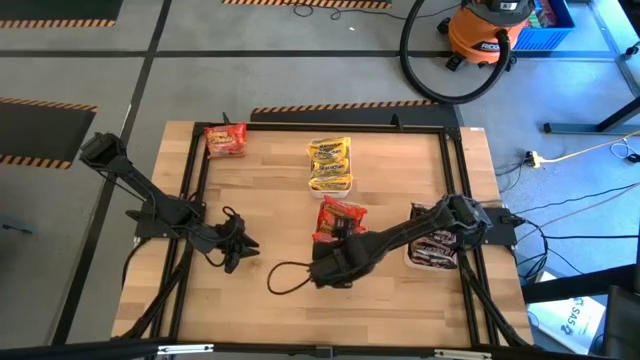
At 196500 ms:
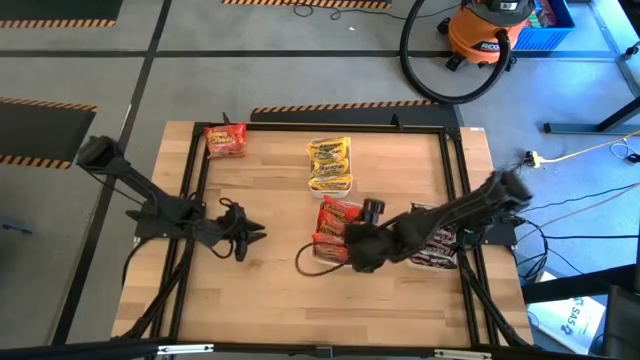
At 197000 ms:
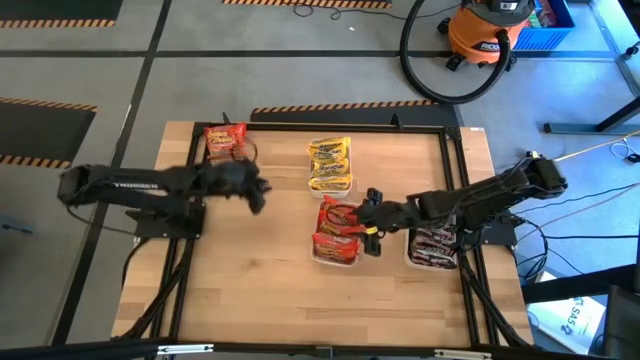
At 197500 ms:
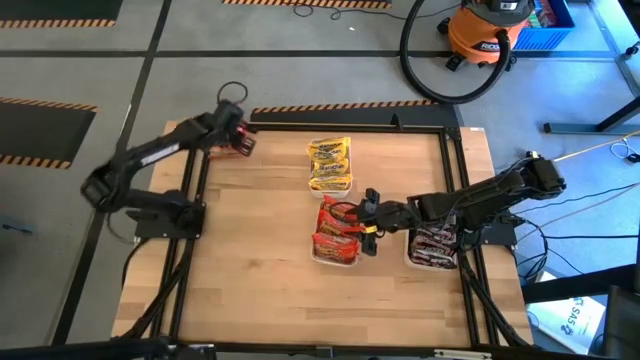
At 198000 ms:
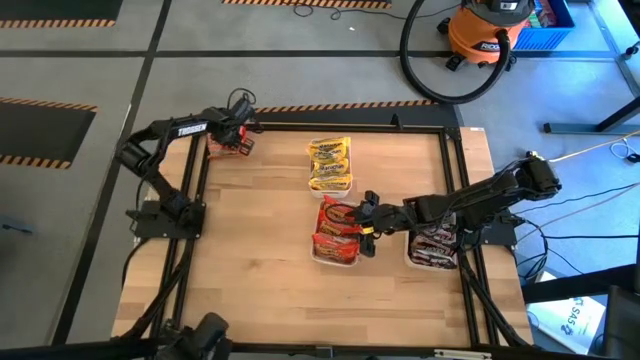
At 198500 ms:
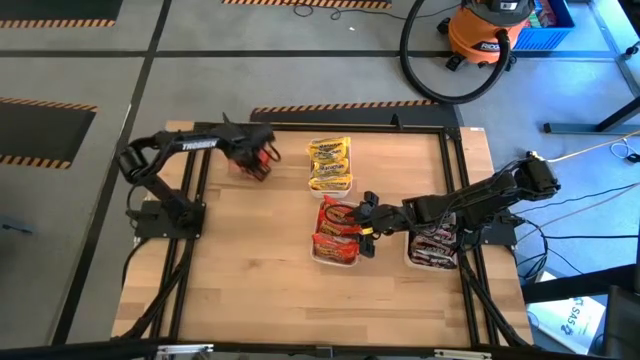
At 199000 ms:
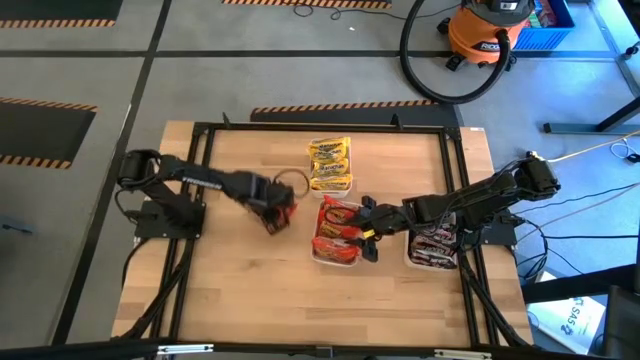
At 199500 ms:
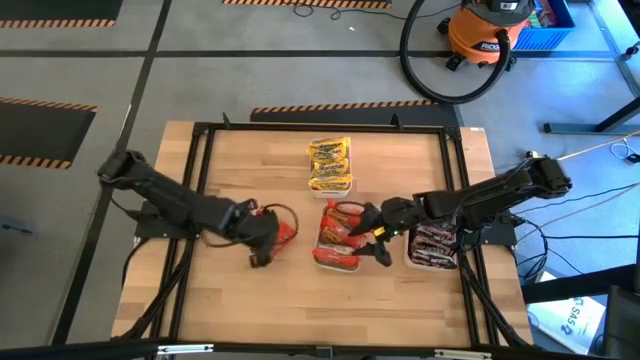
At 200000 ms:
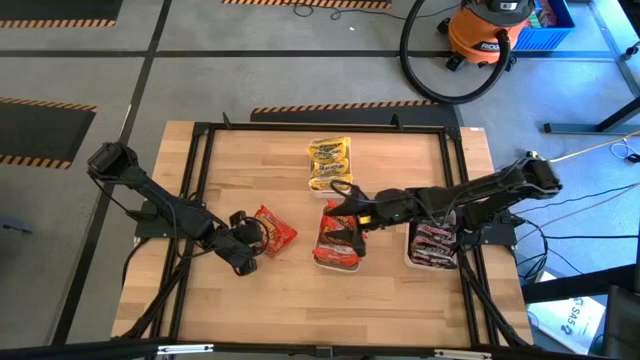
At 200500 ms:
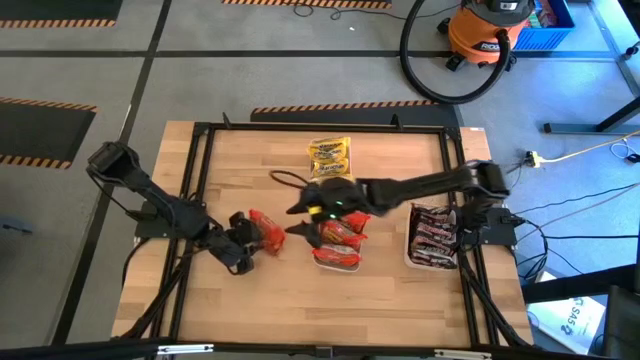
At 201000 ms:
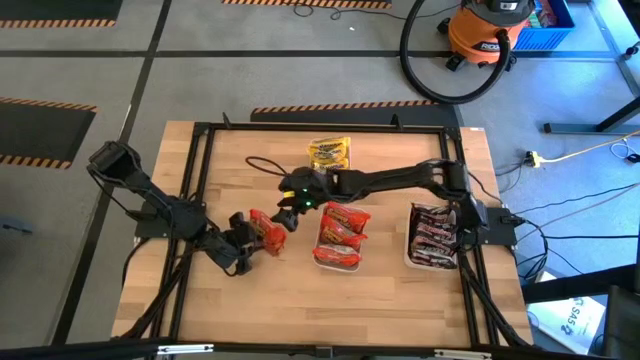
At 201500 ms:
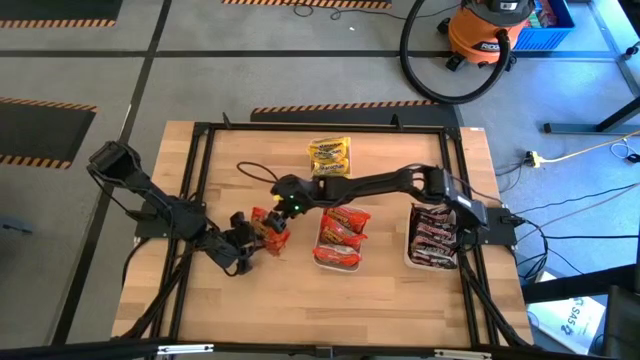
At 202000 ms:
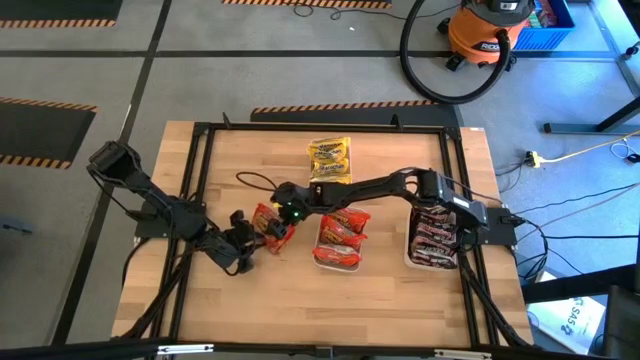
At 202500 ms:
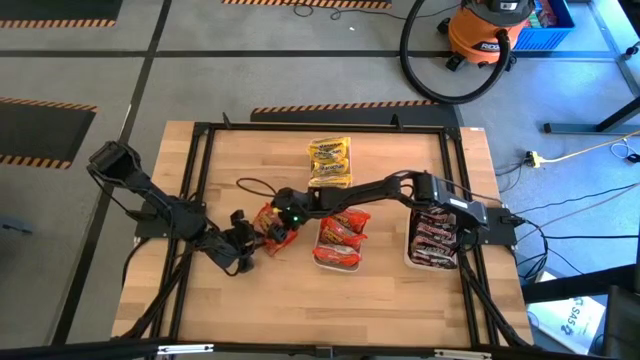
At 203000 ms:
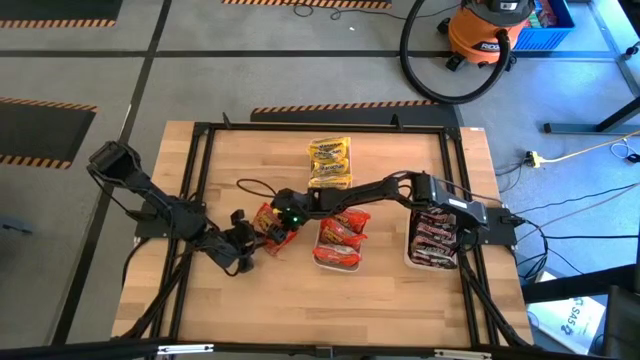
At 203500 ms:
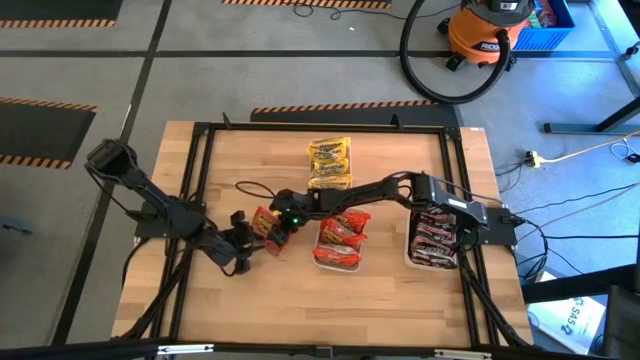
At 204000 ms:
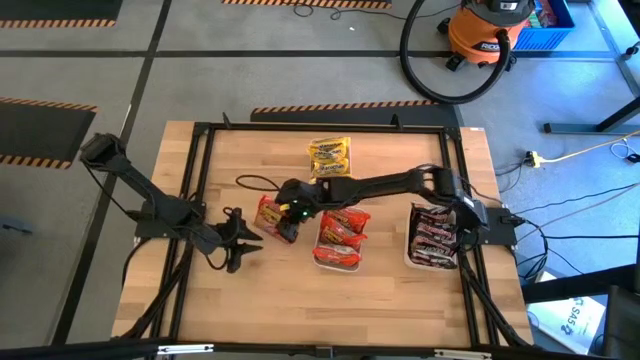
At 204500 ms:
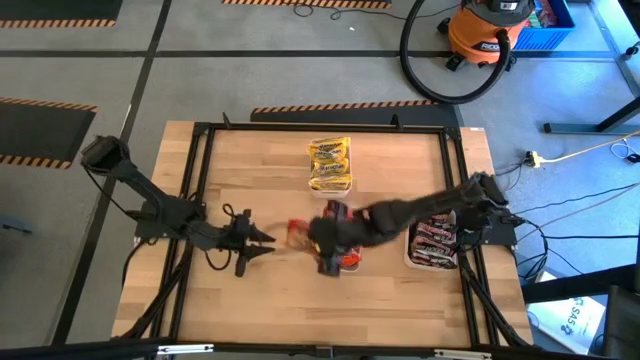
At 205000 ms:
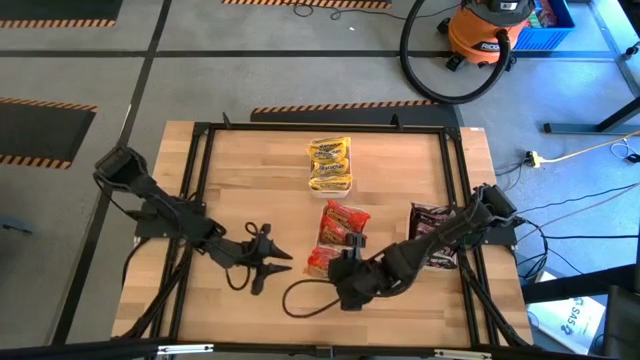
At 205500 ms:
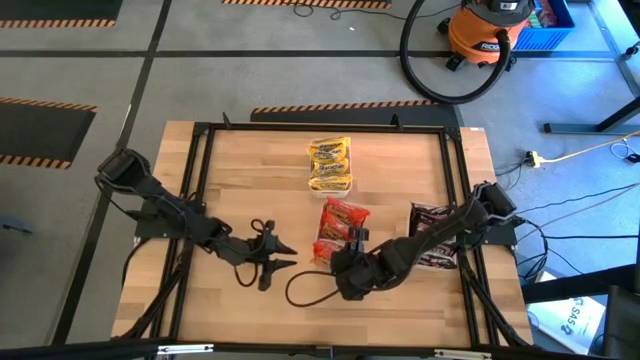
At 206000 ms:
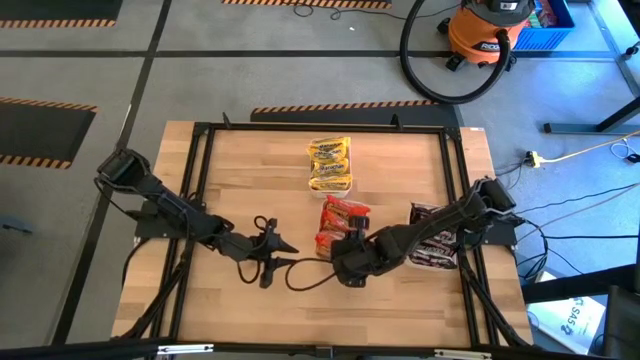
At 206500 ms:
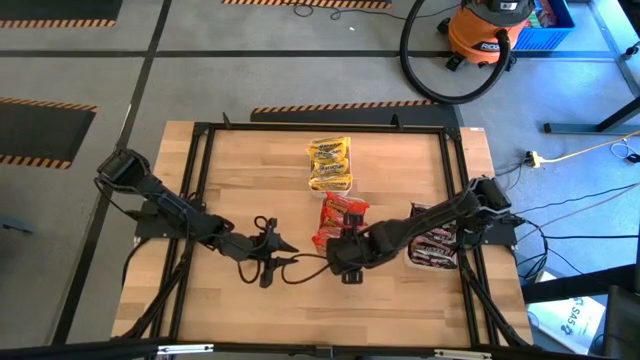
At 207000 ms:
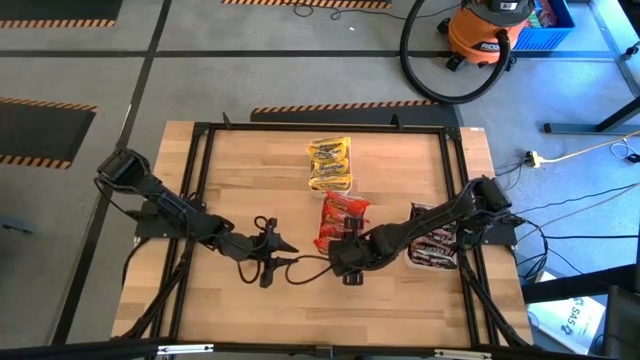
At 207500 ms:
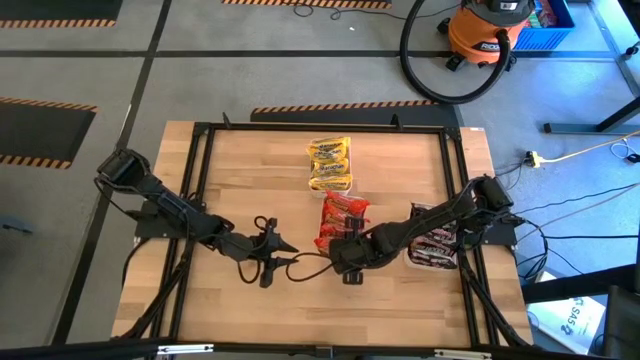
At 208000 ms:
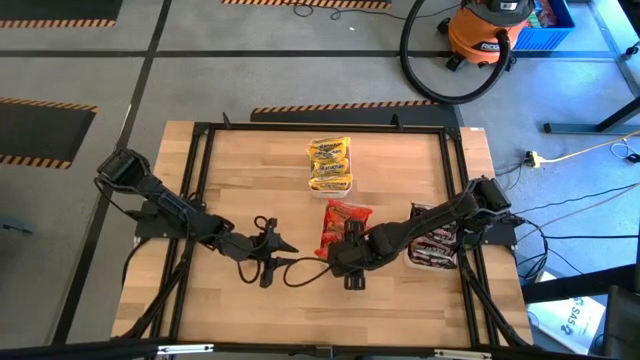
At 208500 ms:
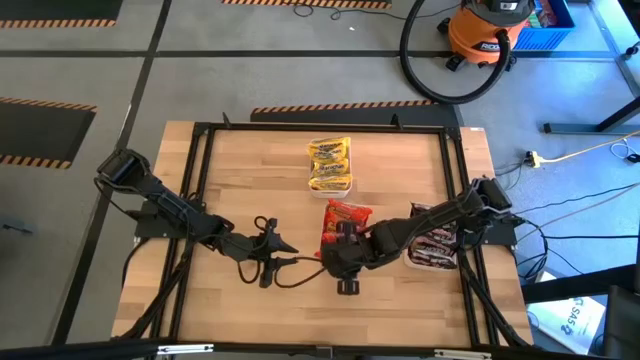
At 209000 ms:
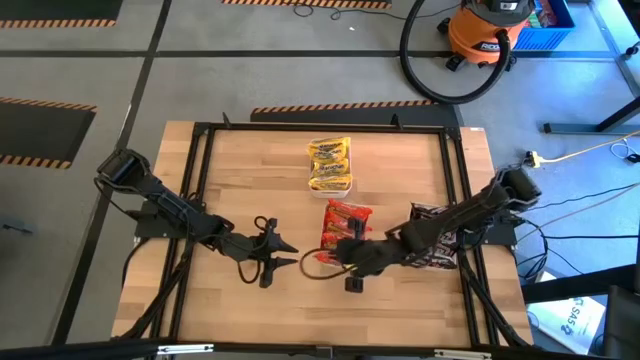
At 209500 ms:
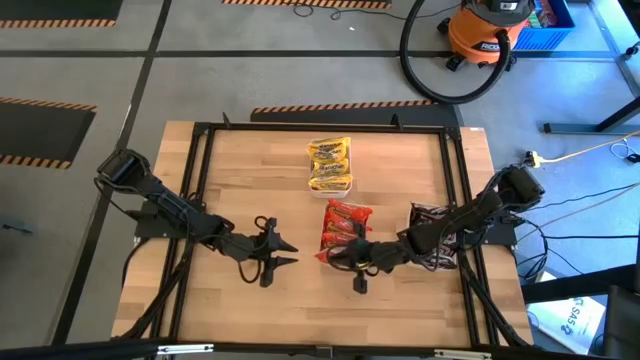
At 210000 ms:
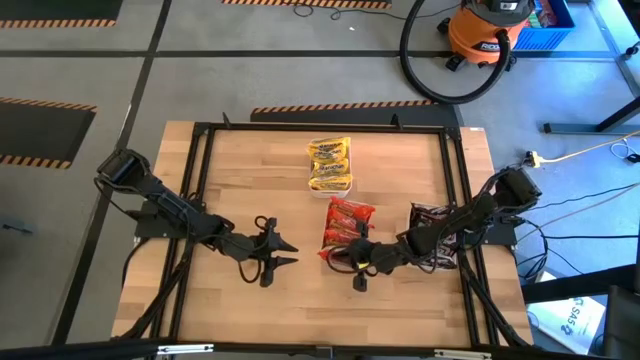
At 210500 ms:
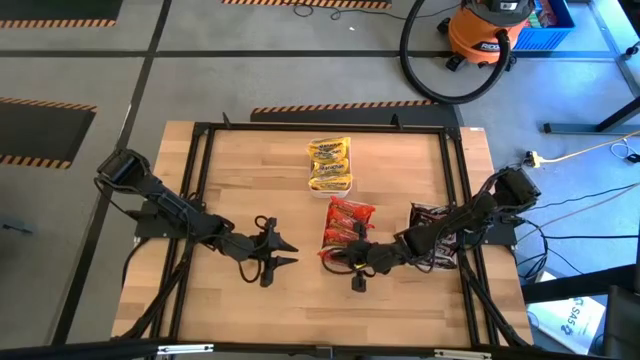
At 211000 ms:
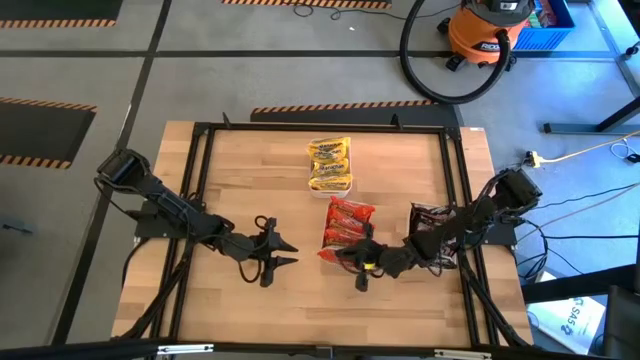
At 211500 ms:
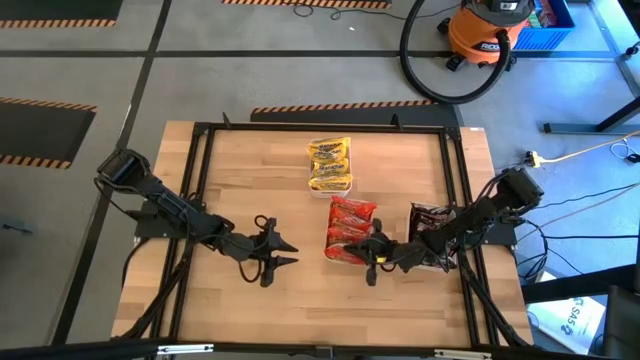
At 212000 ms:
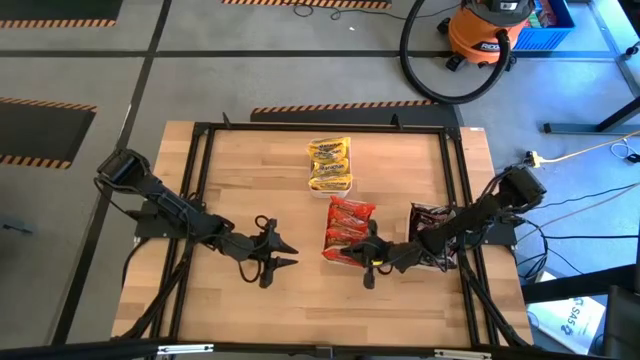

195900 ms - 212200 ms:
Task: Sort Maruchan noodles
Put the orange noodle pack into bottom white bin

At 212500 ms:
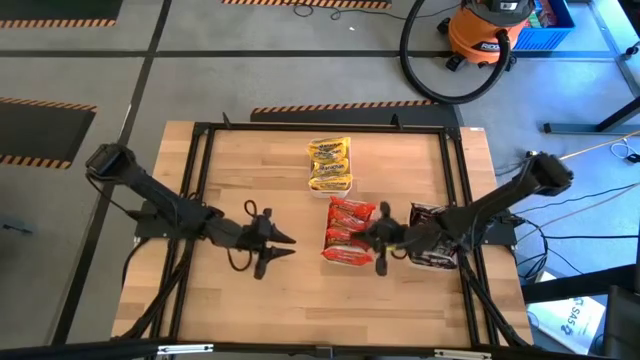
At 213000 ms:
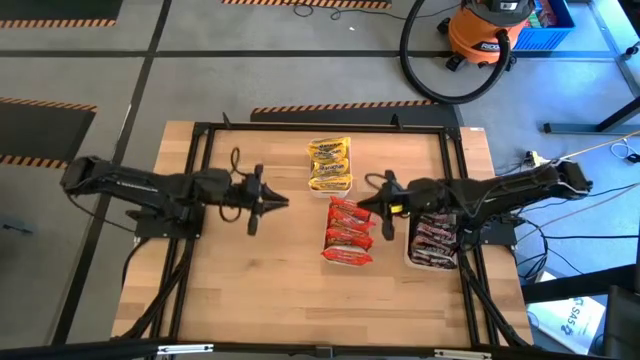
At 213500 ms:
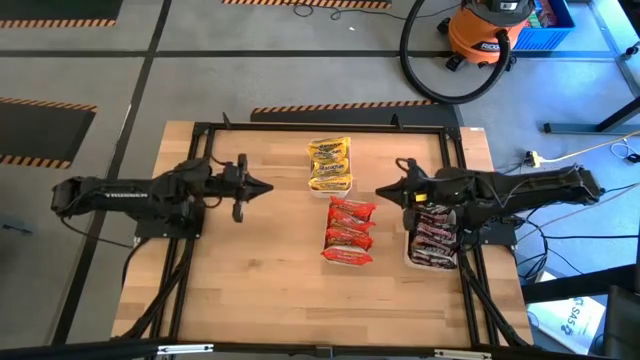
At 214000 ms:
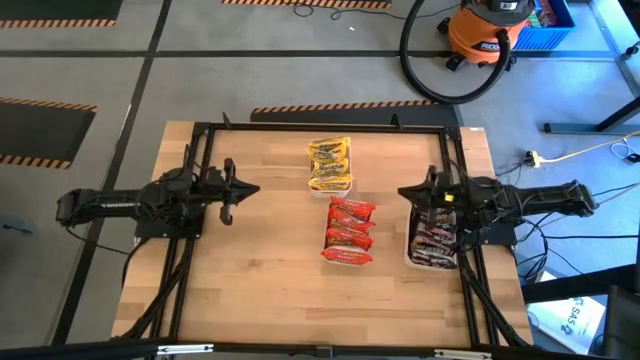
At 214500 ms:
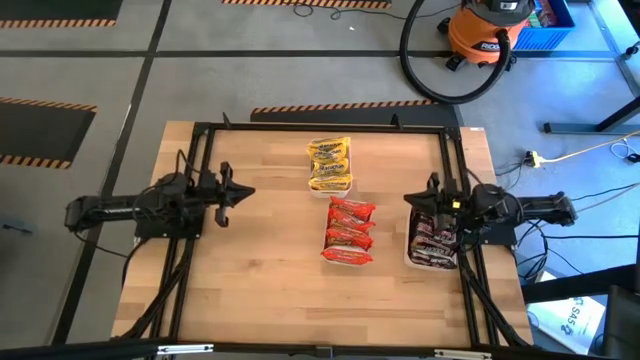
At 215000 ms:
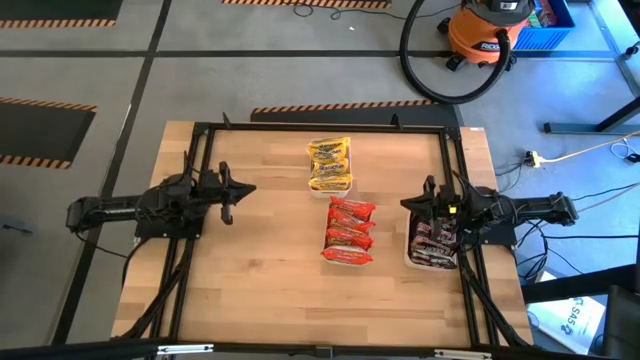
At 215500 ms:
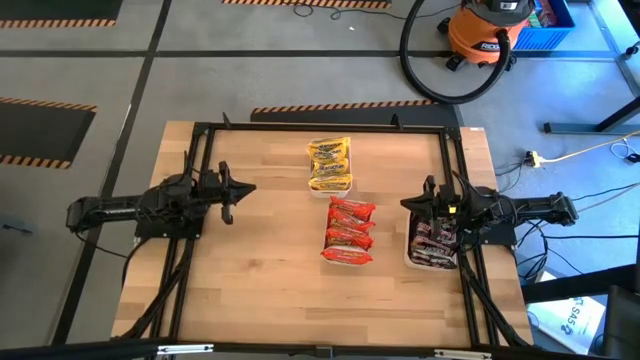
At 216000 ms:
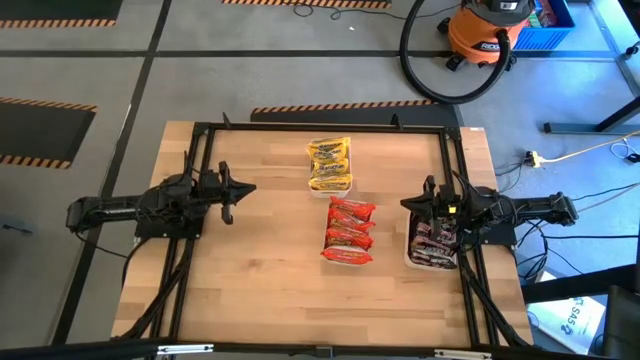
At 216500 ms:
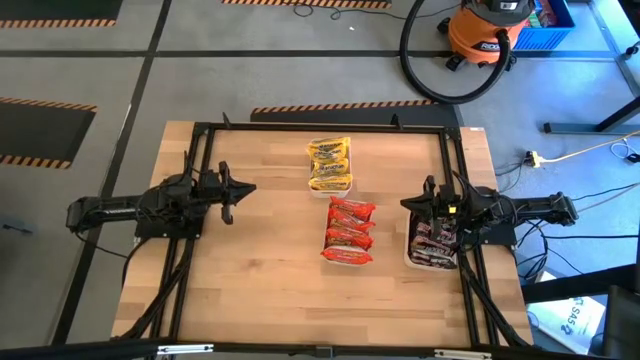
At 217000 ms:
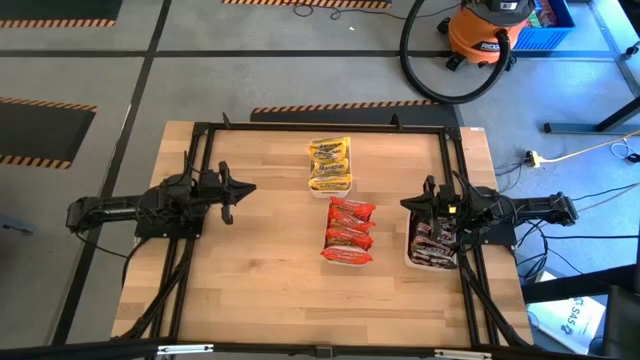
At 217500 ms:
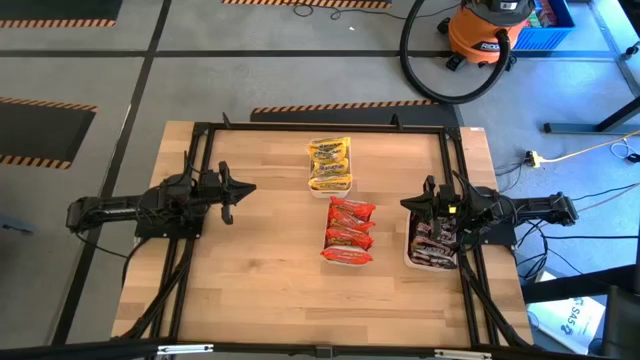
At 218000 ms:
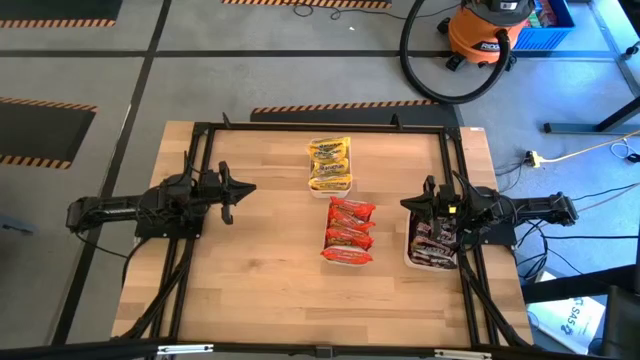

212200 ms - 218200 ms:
Return to Home Position
